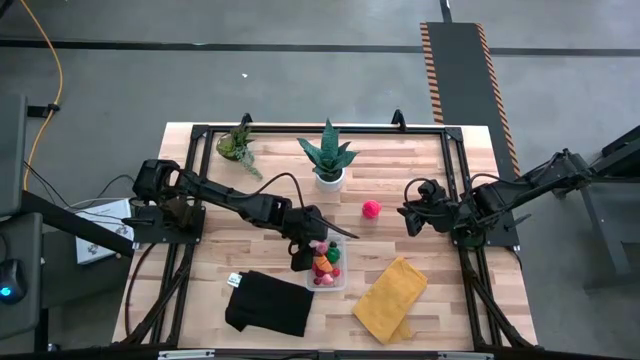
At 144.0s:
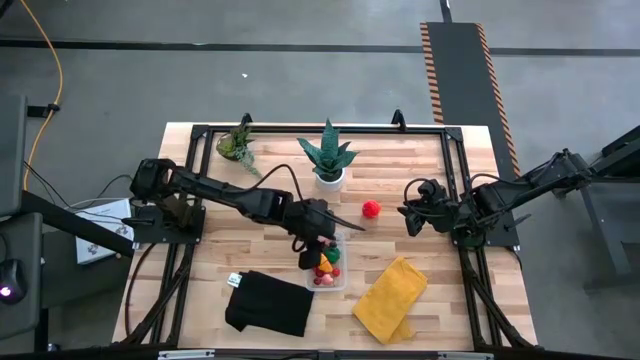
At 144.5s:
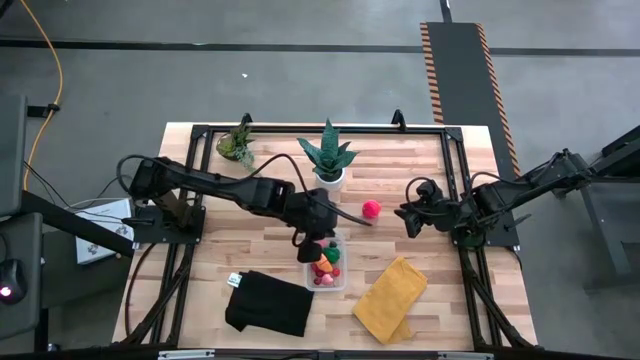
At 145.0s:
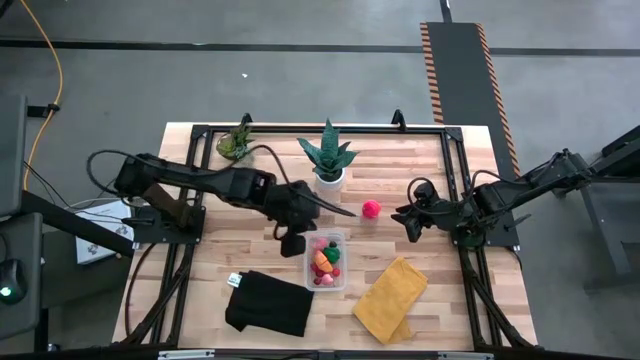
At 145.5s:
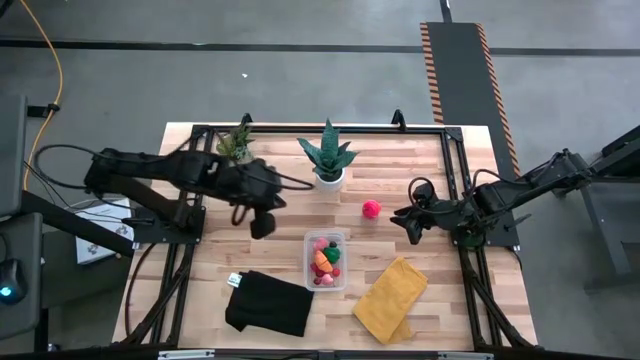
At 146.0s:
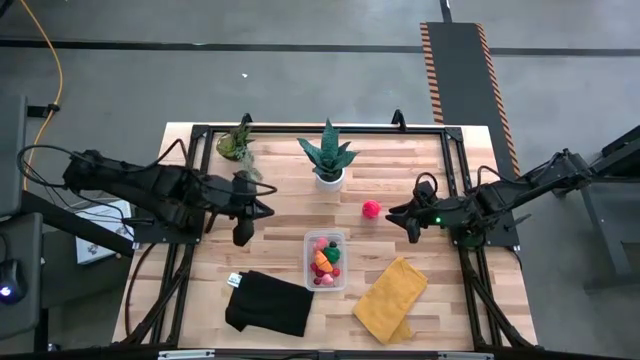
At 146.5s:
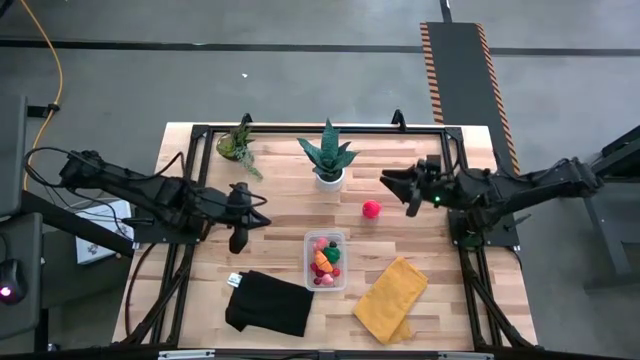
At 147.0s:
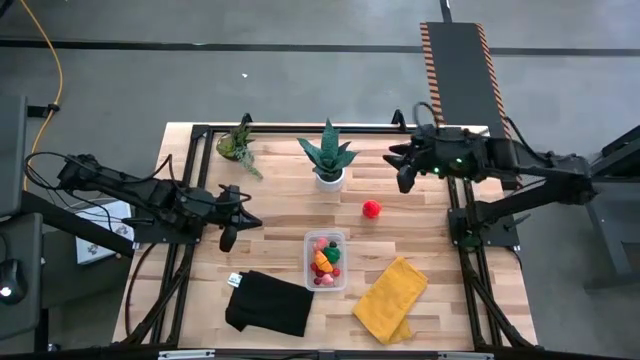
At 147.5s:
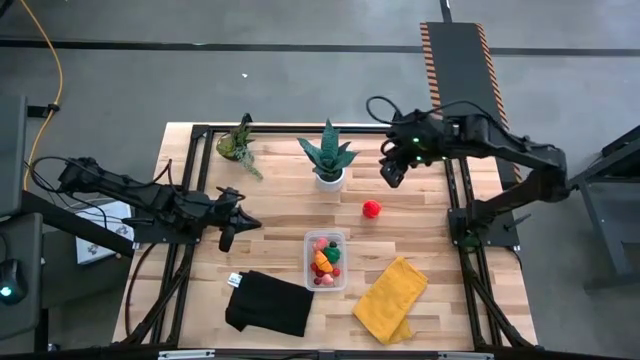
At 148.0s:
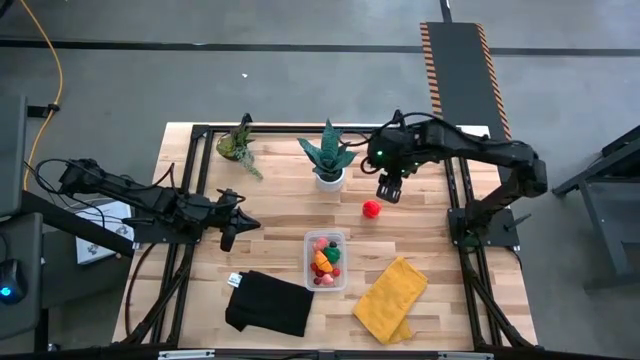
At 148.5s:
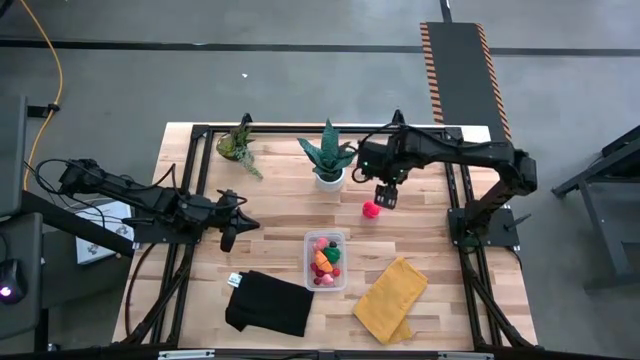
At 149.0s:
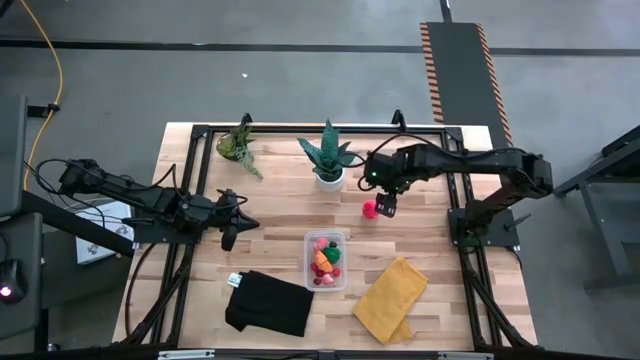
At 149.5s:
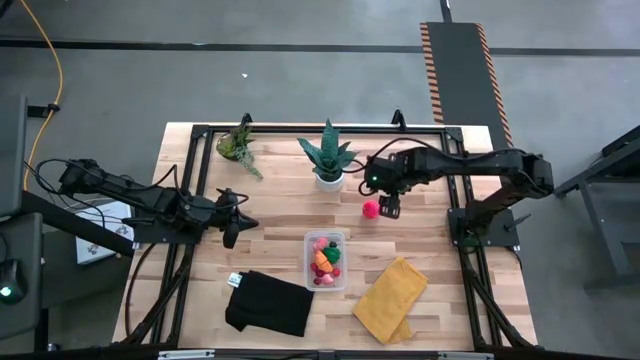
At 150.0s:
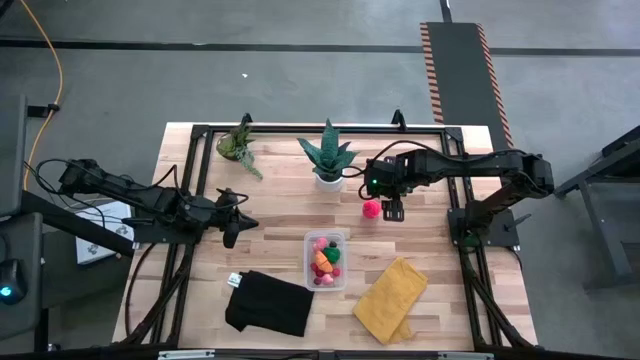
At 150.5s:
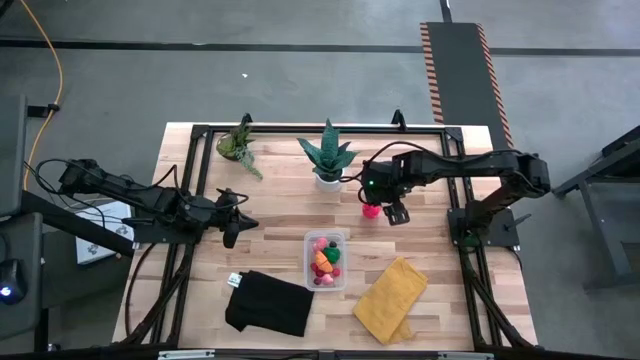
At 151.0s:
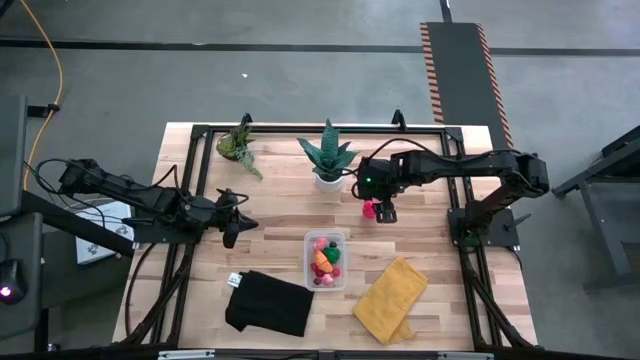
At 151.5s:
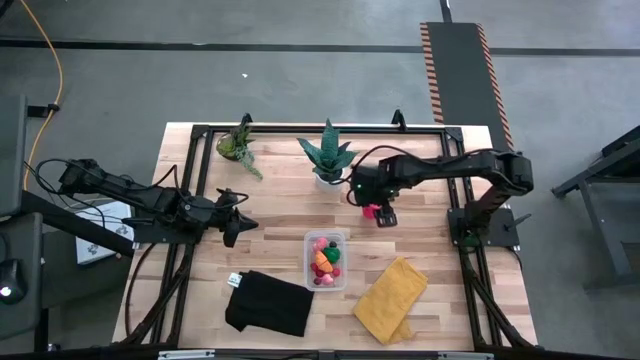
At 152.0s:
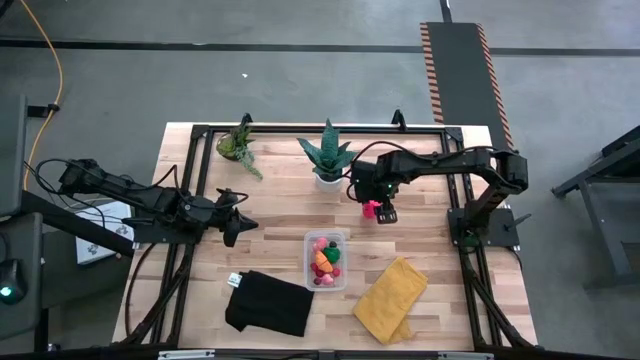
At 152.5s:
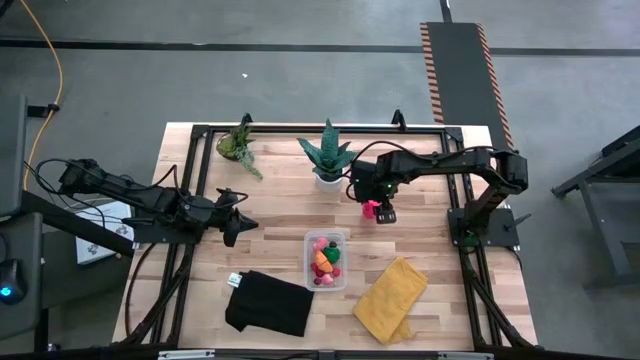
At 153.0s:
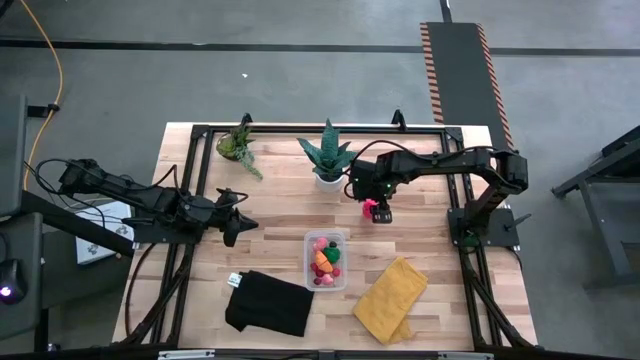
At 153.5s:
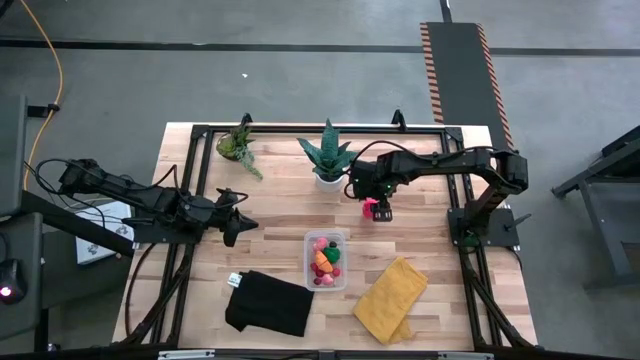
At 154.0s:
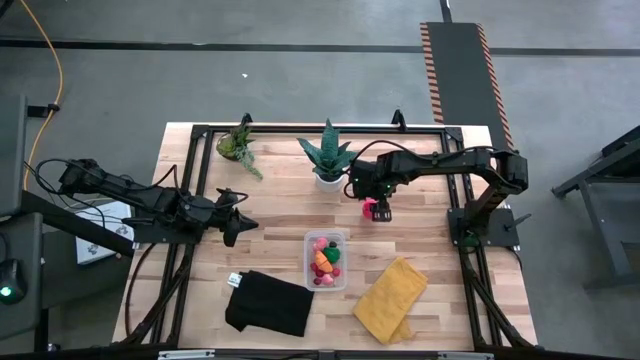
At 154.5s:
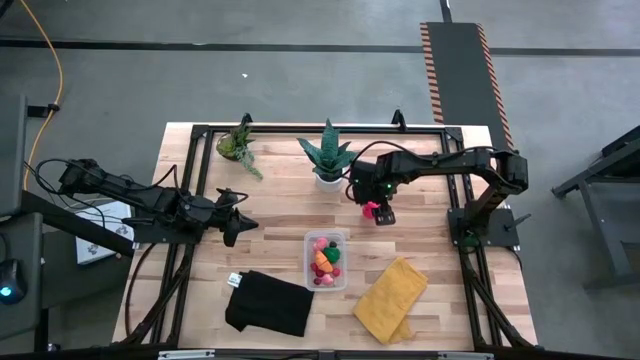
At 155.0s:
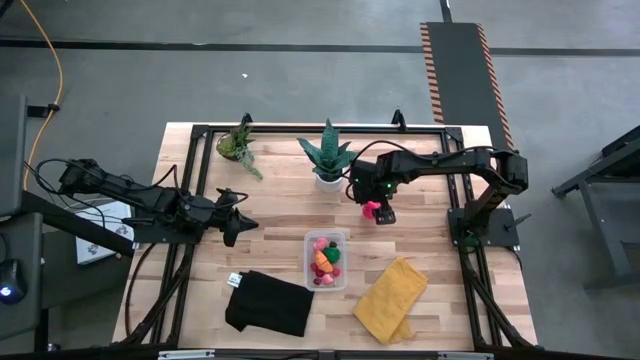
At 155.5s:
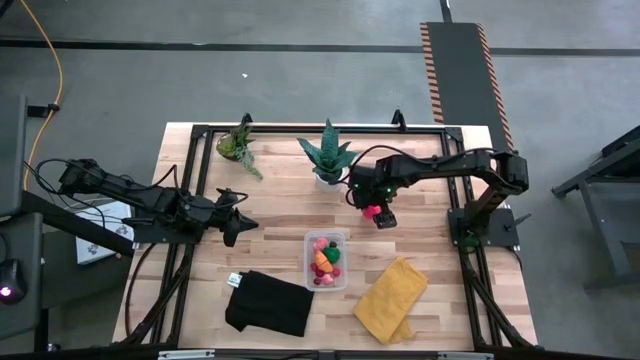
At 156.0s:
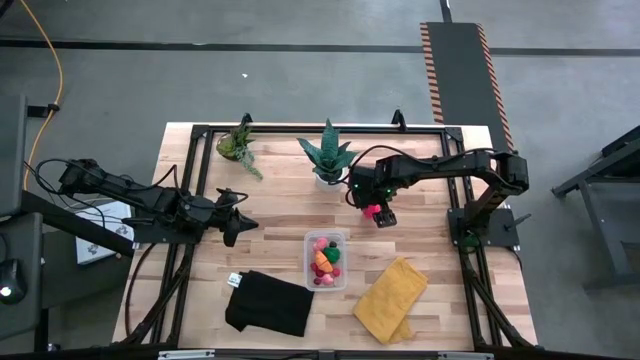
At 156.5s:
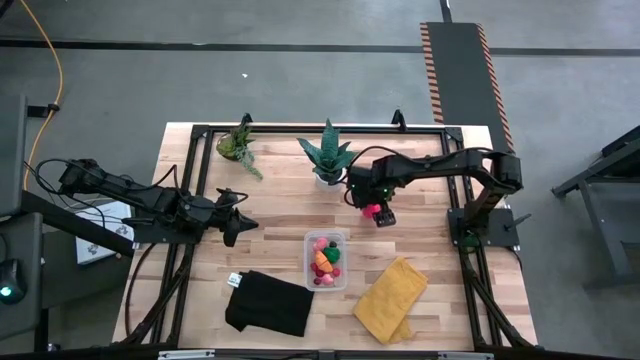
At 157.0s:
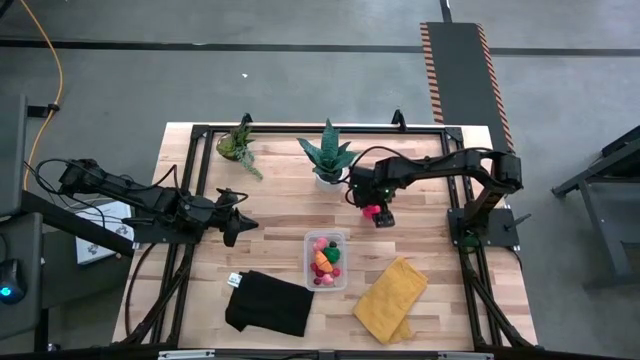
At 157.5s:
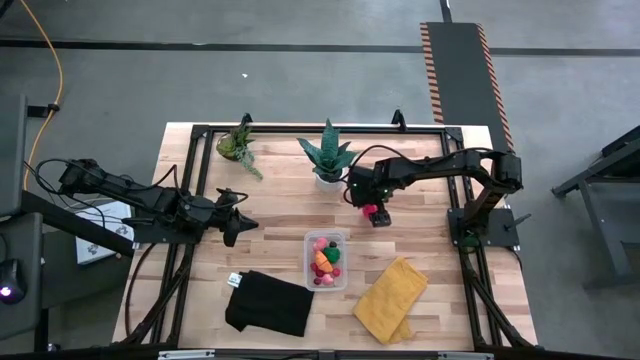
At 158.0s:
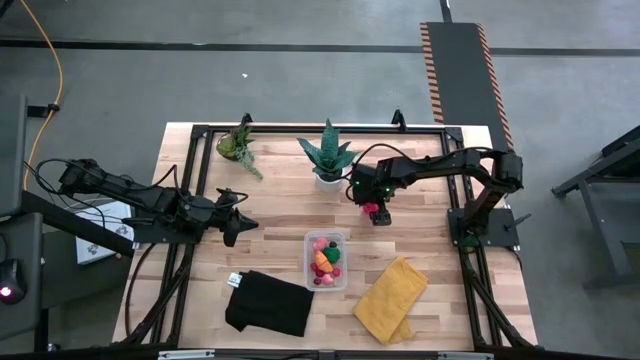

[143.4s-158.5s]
Task: Pick and placing Produce into tupperware
Put the apple into the transparent container

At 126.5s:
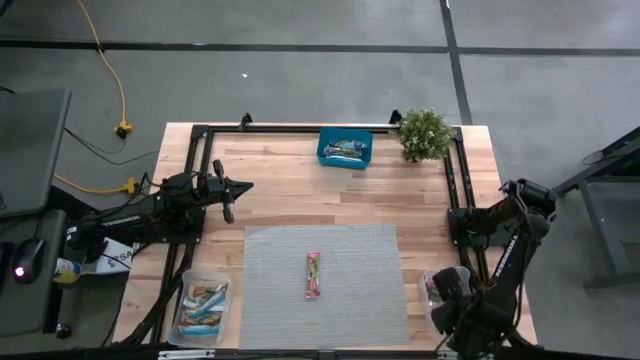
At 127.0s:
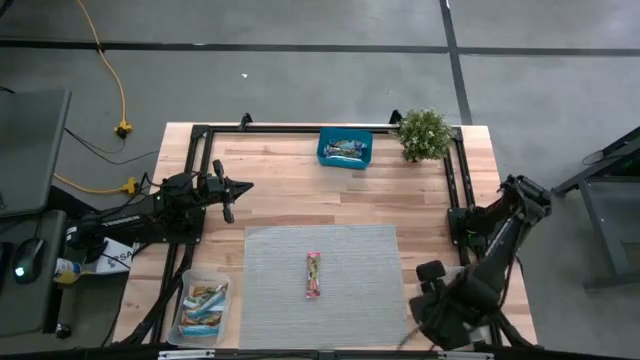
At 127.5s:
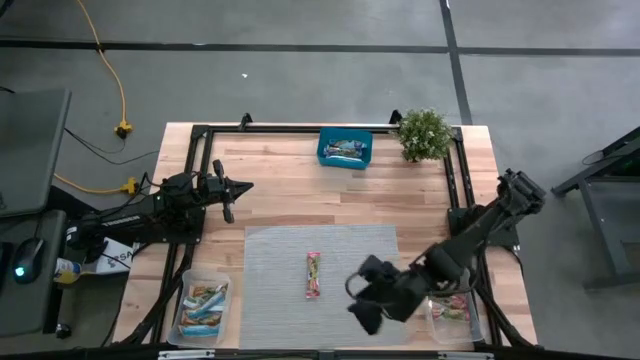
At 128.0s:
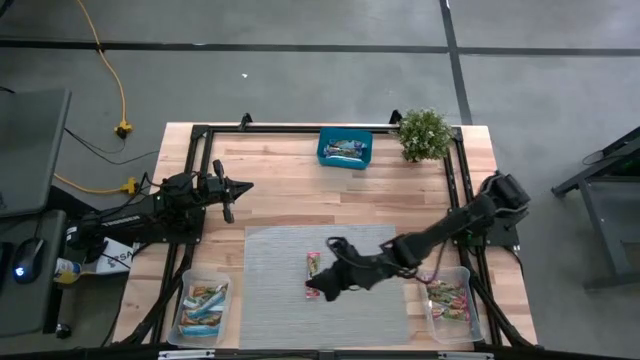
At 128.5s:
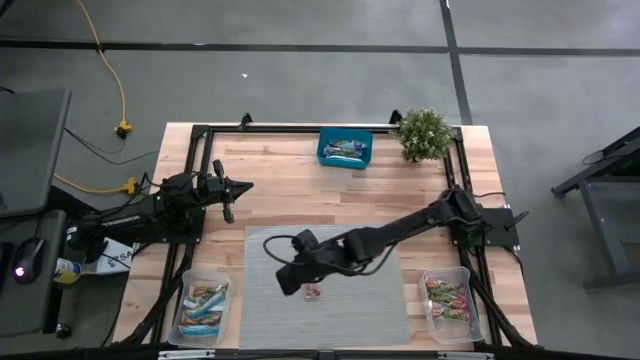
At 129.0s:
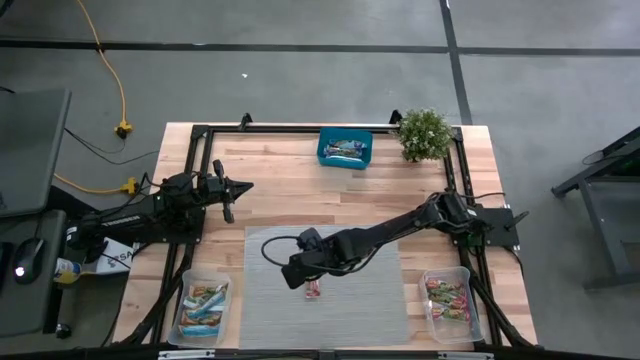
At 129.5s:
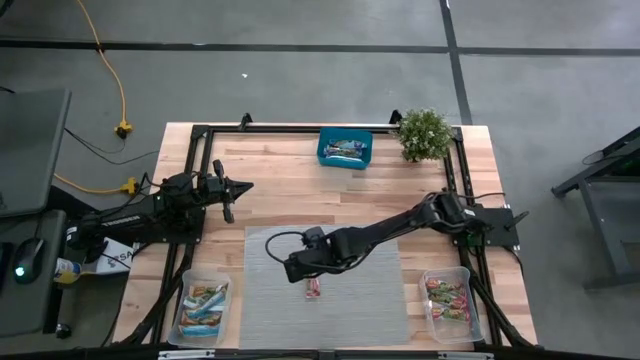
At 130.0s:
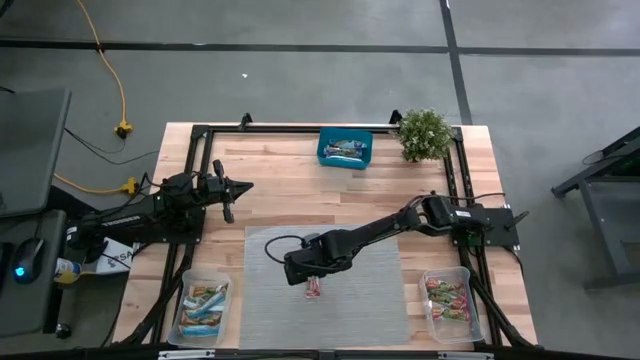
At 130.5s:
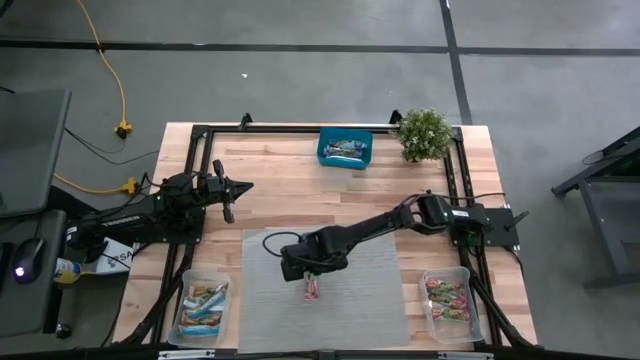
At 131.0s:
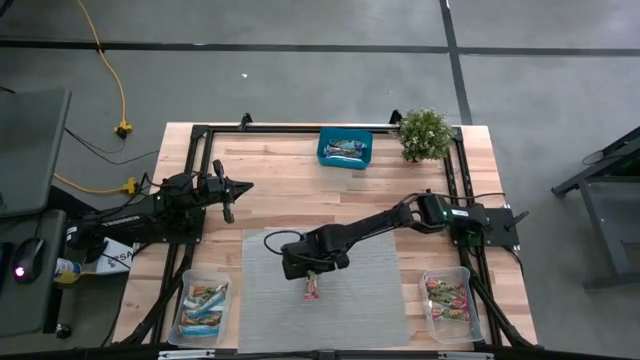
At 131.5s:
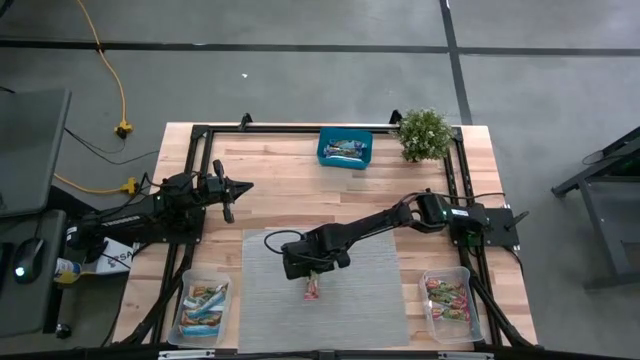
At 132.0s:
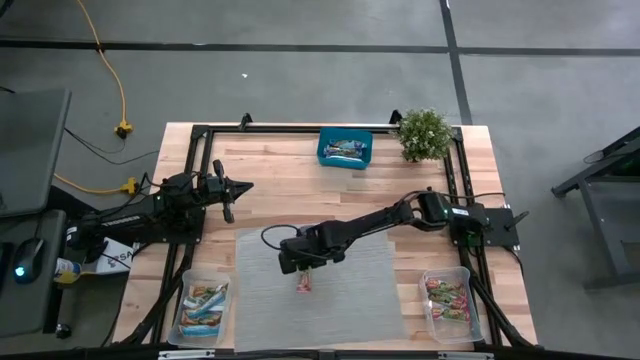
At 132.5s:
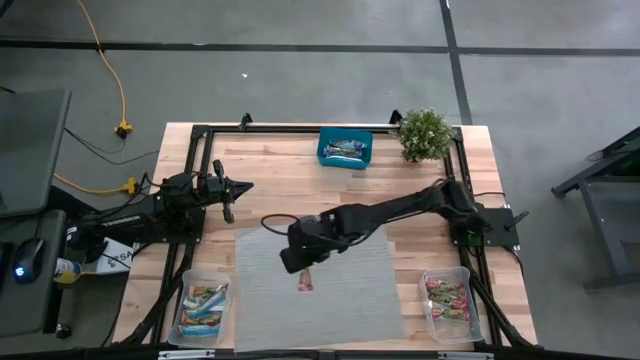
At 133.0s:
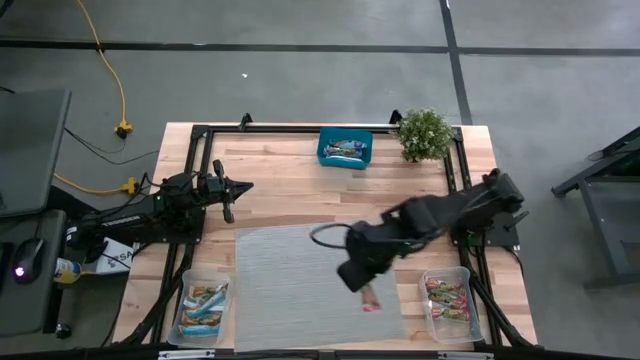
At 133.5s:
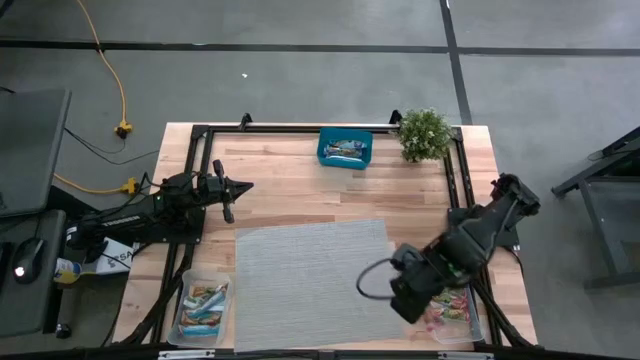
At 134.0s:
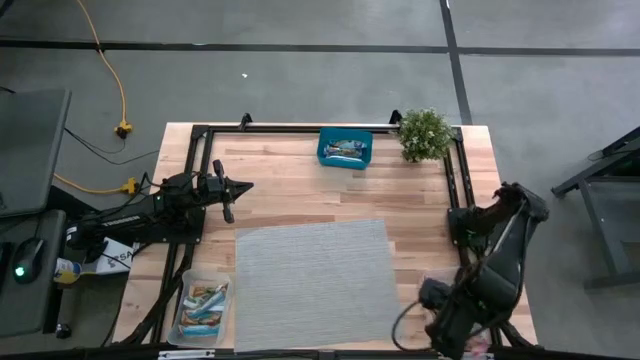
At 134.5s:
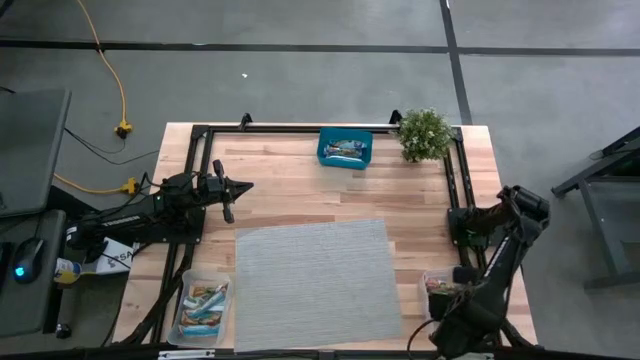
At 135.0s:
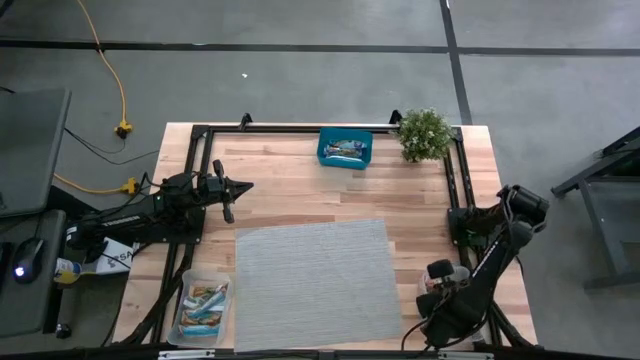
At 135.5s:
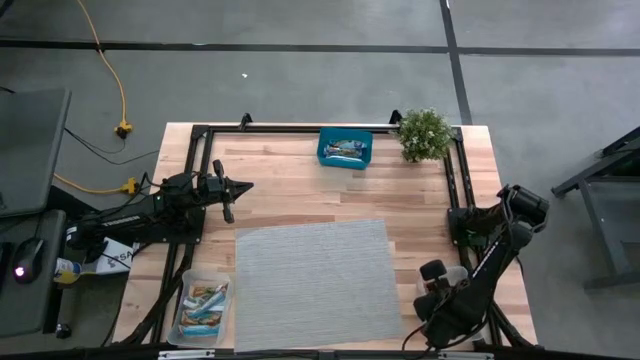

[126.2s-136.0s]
Task: Pick and place Granola Bars by type
Put the red granola bar into the right transparent bin
